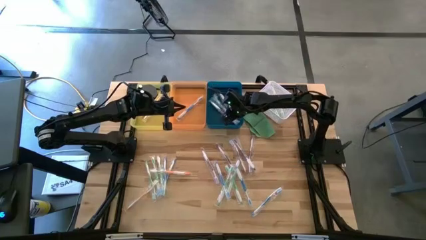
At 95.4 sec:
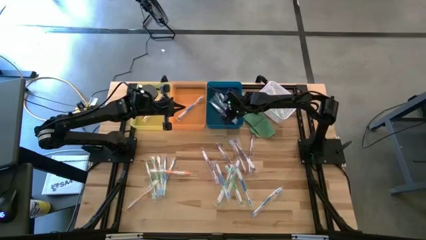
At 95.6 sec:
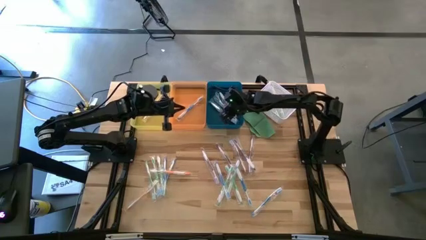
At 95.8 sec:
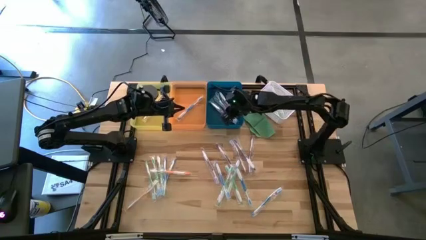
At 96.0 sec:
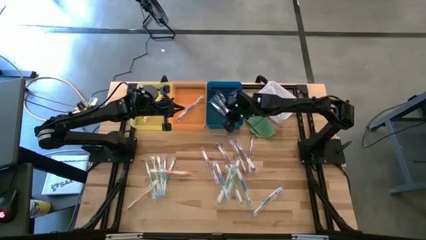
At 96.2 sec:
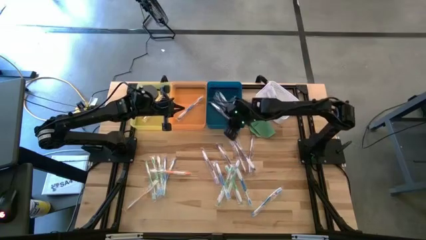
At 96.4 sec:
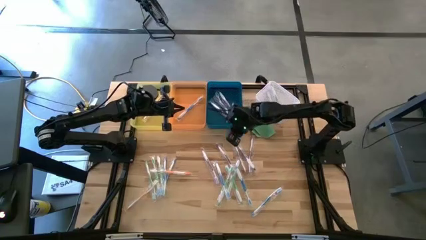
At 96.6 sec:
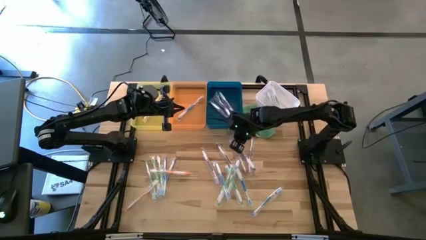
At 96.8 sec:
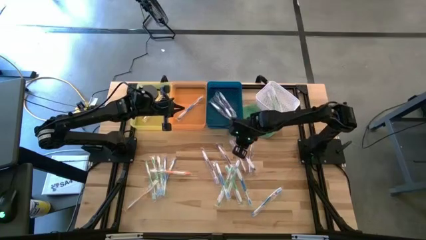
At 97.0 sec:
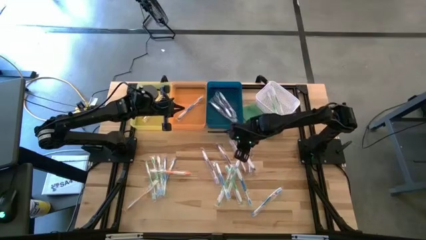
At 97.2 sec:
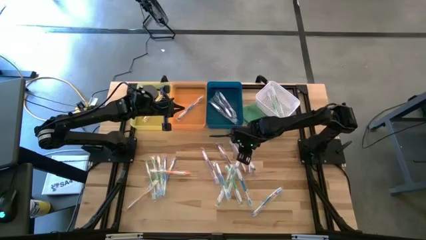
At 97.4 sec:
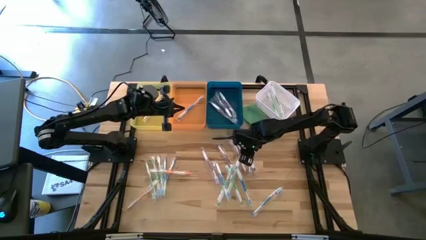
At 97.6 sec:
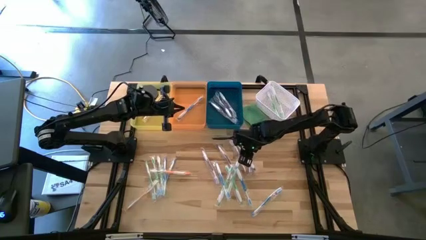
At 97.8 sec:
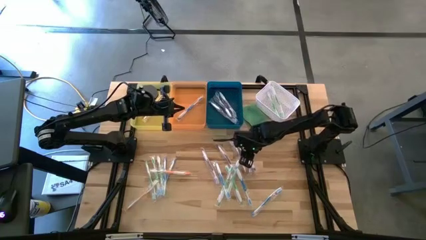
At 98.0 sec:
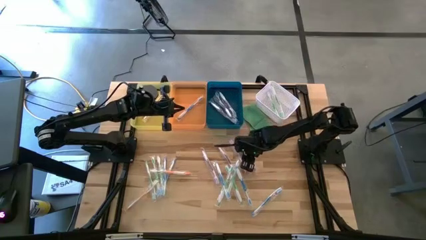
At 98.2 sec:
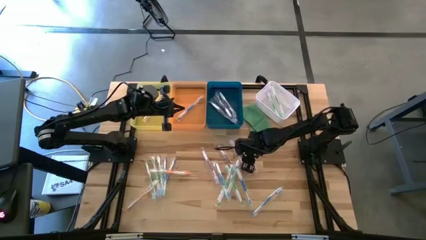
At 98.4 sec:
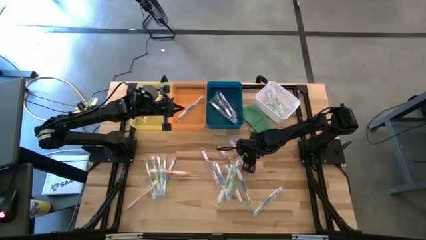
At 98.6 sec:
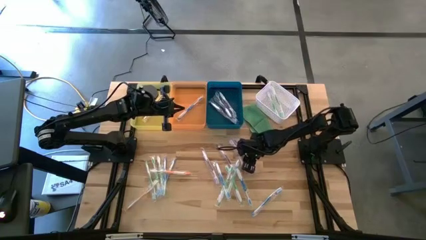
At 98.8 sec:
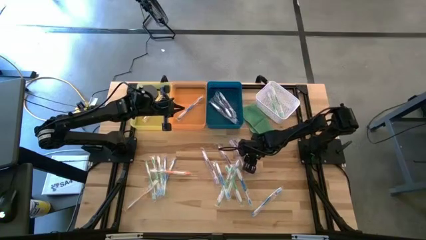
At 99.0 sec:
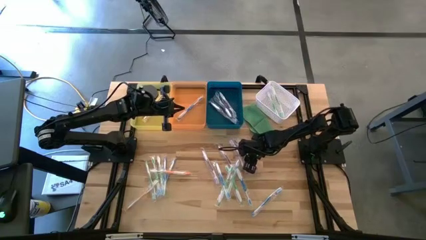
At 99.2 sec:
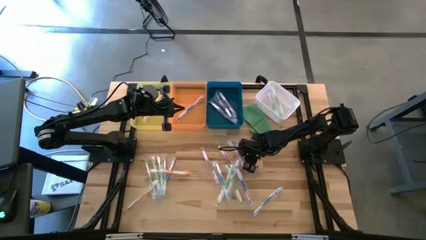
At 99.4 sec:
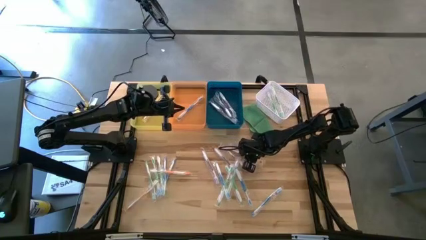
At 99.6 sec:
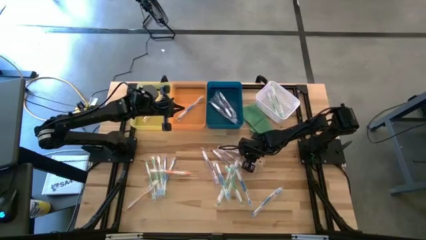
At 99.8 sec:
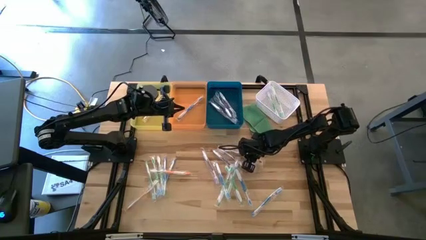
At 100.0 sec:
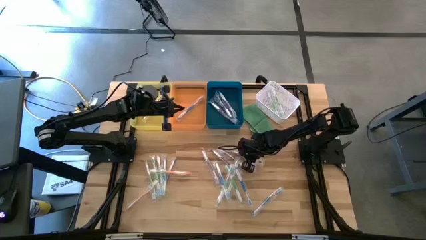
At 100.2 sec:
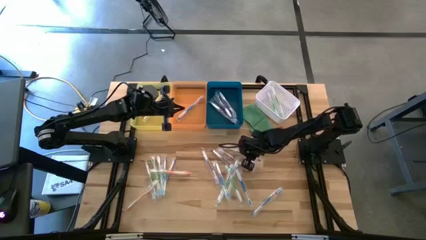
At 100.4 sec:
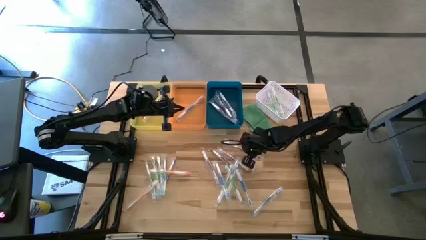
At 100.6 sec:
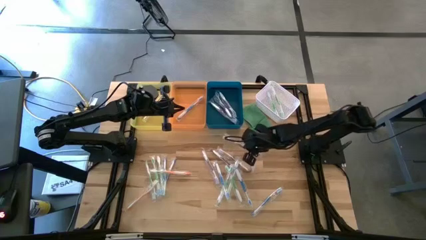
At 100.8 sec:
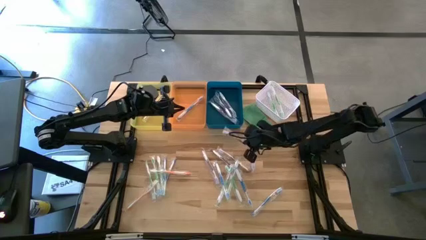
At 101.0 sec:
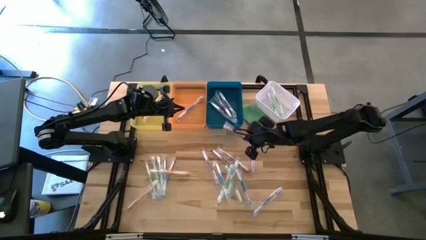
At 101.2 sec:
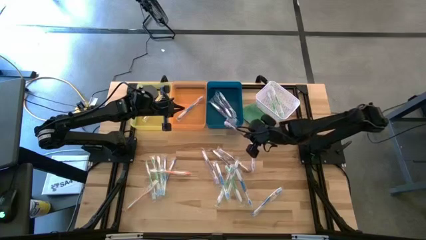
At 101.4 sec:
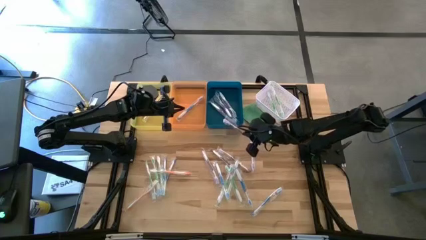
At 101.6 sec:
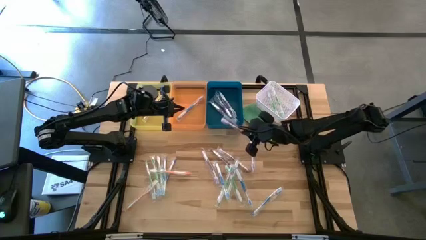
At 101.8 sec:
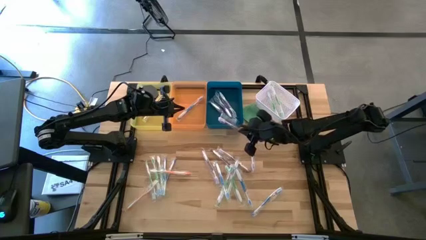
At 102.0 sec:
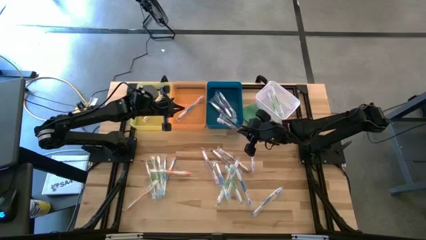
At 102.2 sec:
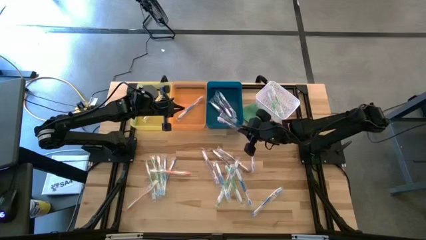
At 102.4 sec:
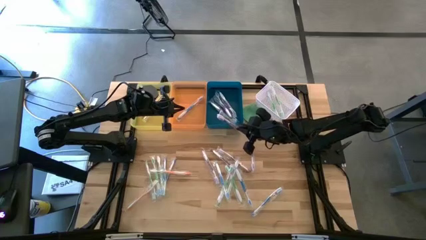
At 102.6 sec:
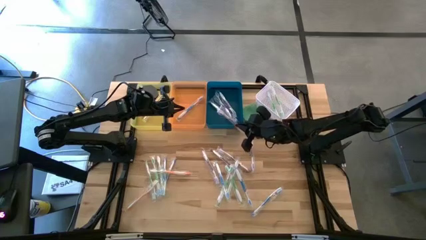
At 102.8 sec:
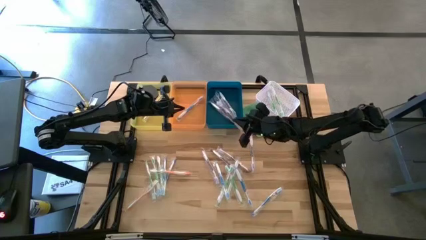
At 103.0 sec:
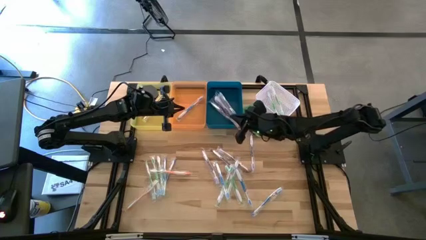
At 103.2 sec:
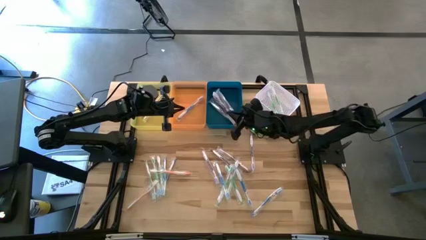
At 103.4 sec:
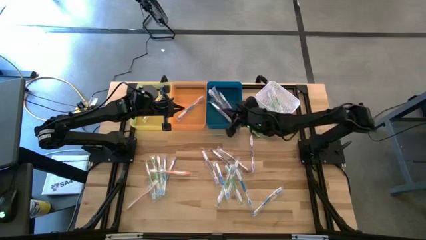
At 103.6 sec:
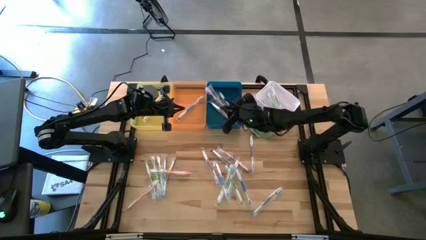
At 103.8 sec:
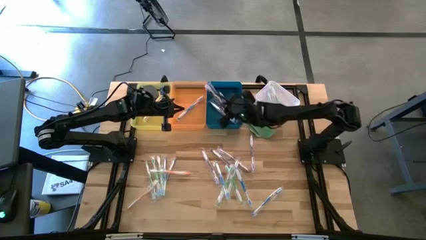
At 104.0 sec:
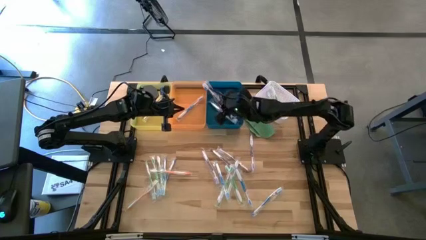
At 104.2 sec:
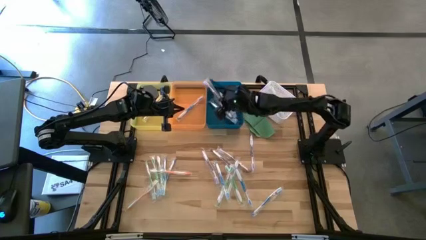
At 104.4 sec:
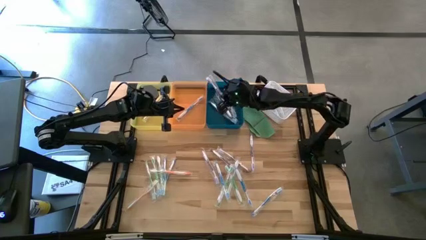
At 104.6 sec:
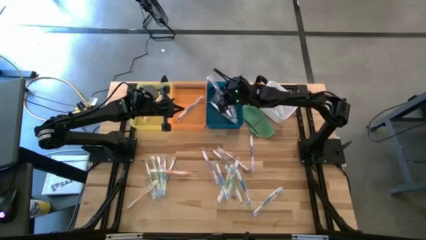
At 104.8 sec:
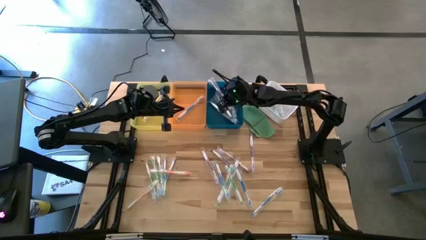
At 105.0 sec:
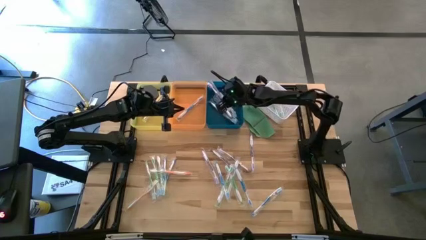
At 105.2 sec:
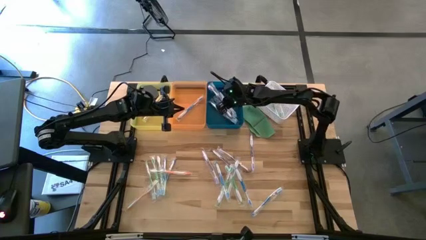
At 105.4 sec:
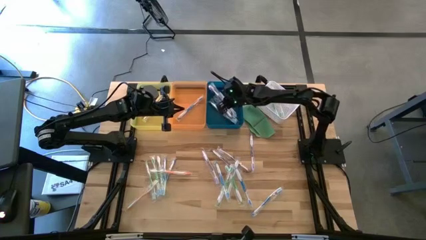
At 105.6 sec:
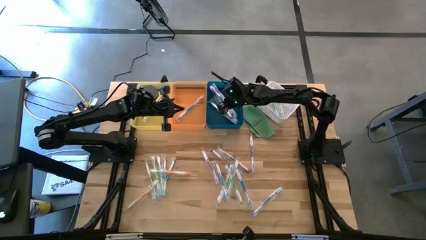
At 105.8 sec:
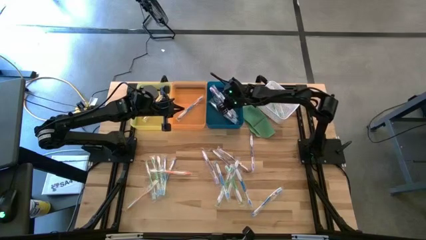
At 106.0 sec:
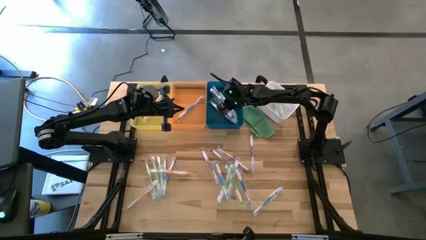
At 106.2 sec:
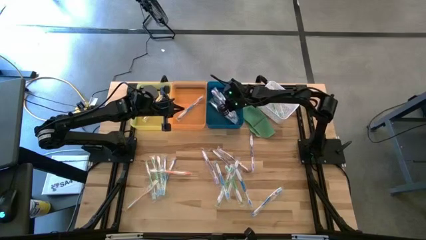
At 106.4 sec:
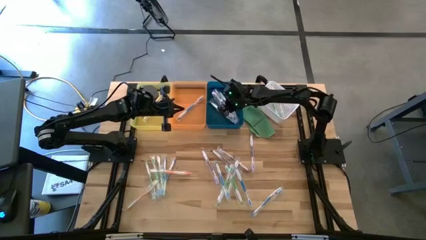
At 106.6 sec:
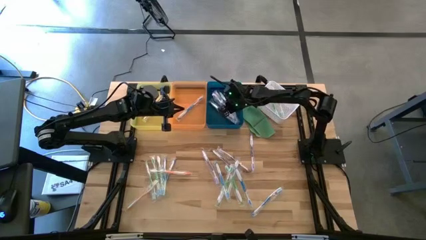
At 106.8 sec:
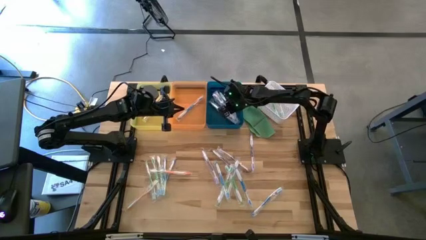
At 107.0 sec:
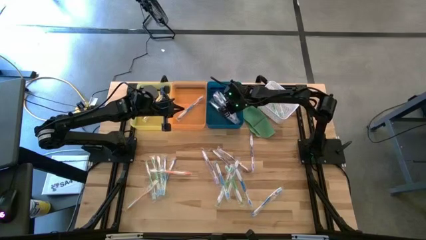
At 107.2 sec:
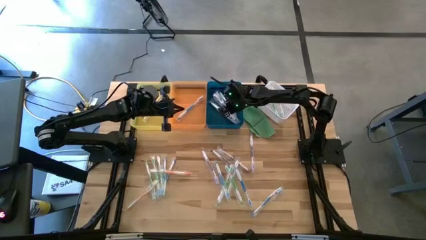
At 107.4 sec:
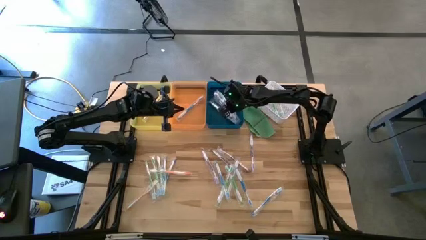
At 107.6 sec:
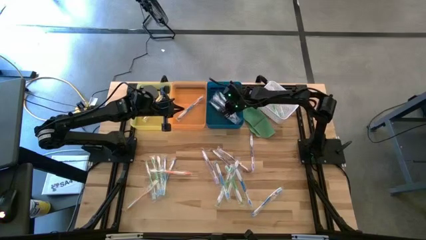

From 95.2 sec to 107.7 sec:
Task: Pick & Place Toothbrushes
Put the purple toothbrush into the blue bin
